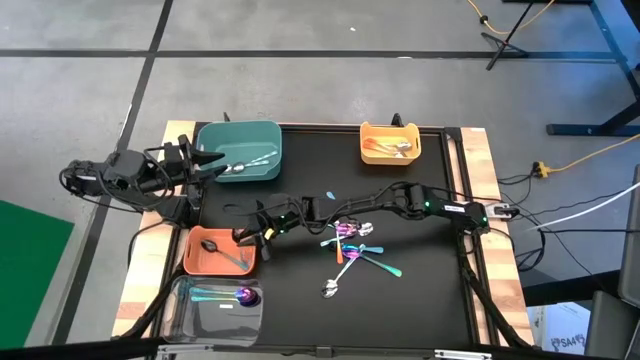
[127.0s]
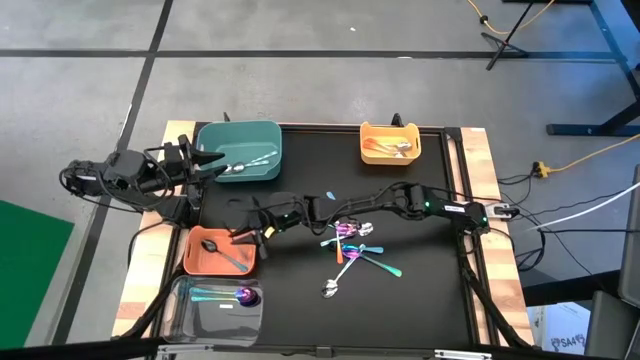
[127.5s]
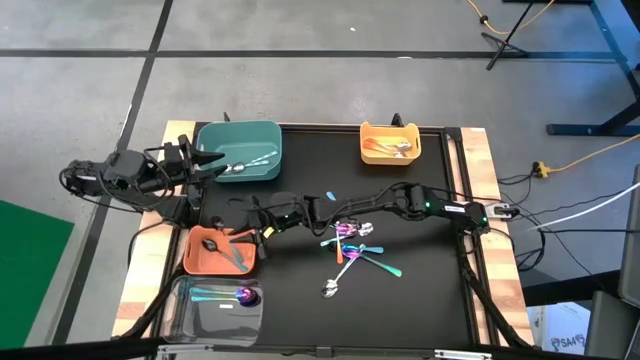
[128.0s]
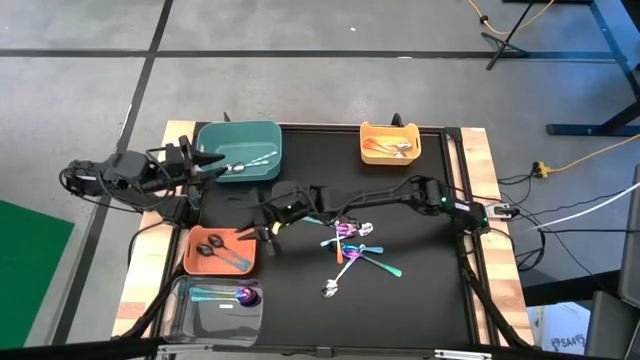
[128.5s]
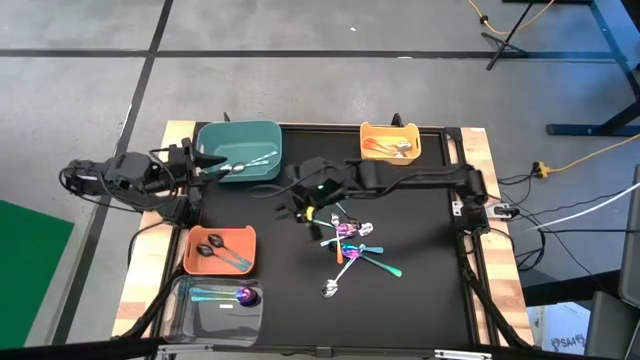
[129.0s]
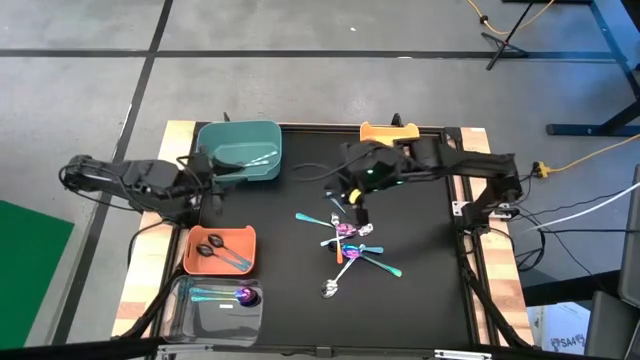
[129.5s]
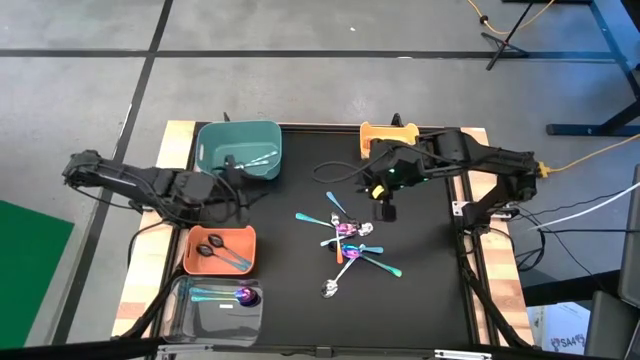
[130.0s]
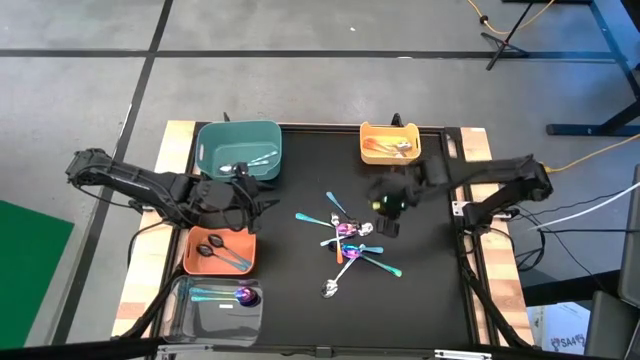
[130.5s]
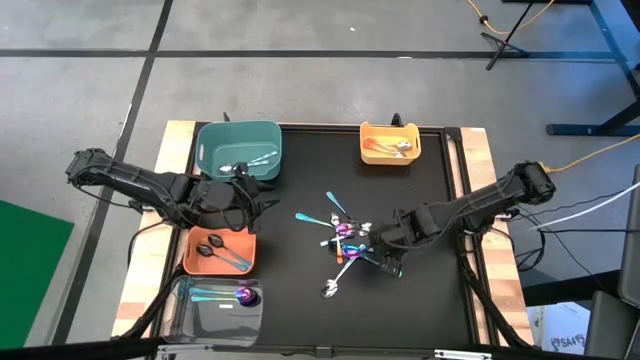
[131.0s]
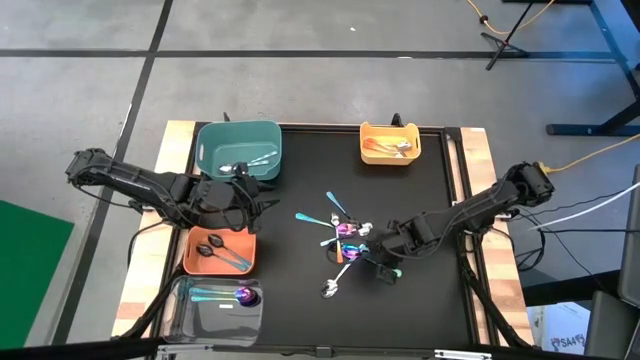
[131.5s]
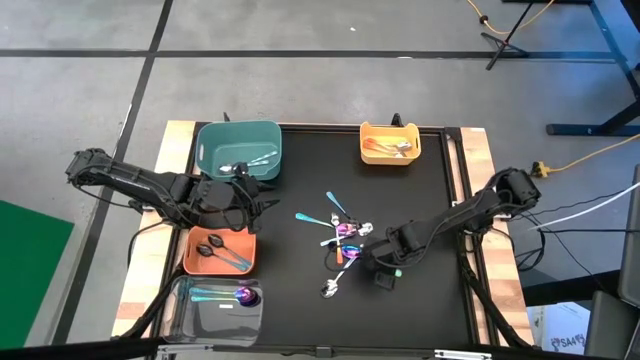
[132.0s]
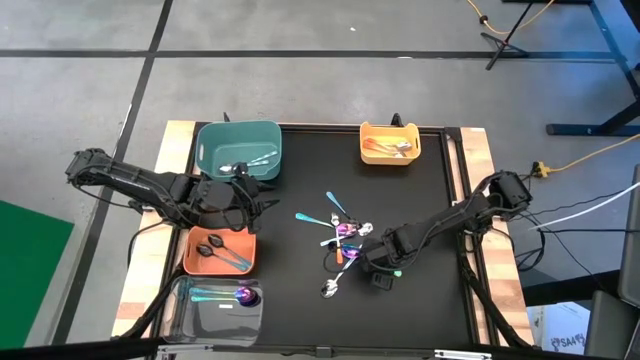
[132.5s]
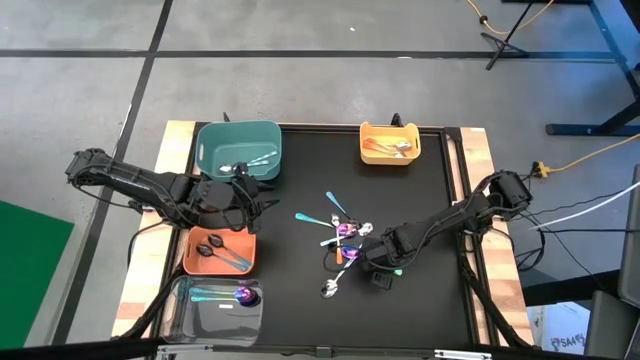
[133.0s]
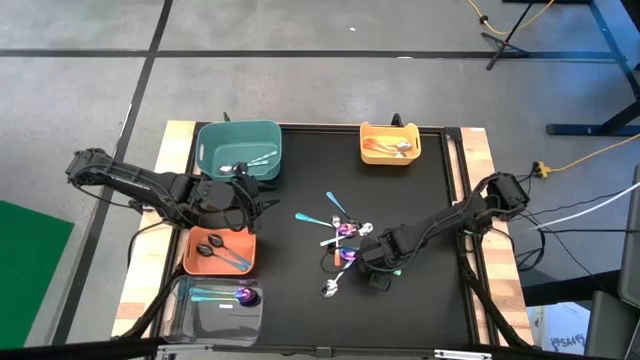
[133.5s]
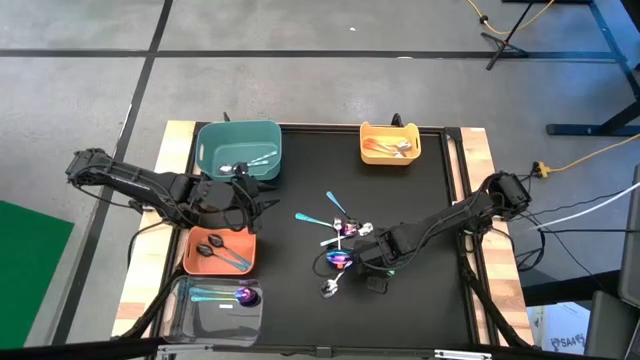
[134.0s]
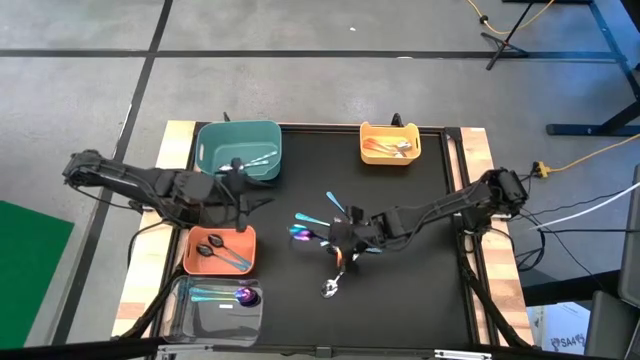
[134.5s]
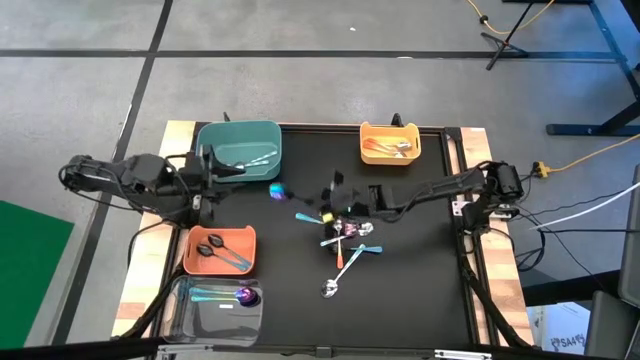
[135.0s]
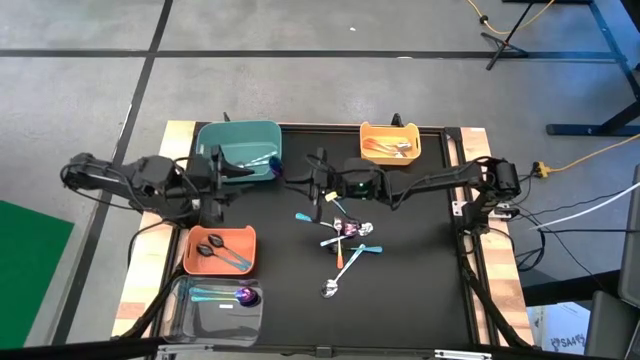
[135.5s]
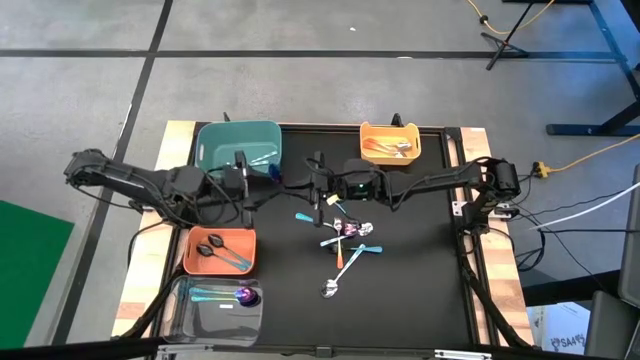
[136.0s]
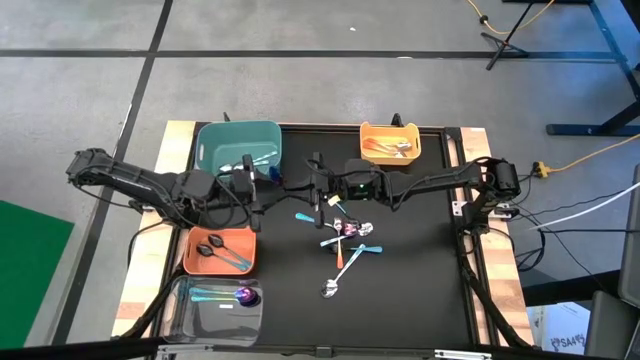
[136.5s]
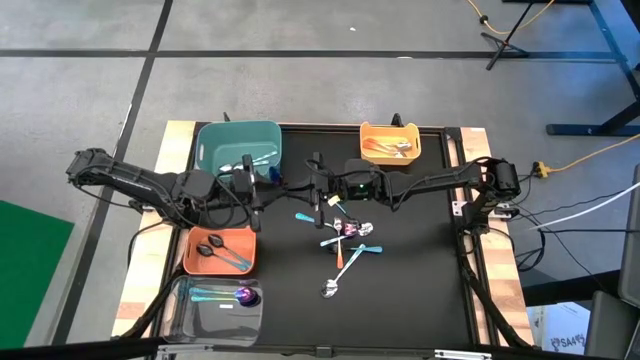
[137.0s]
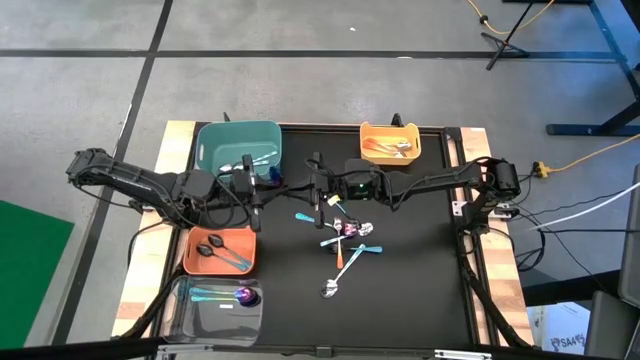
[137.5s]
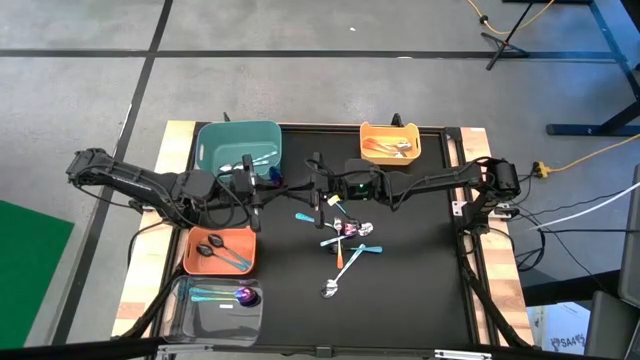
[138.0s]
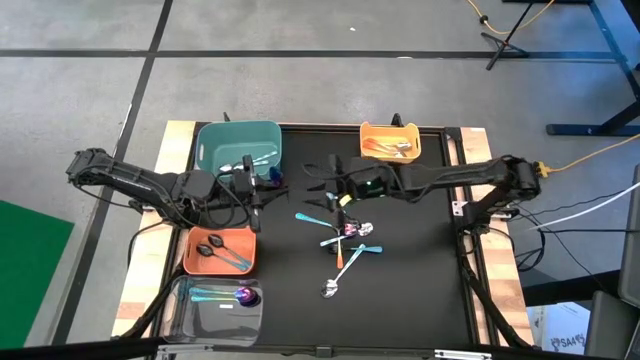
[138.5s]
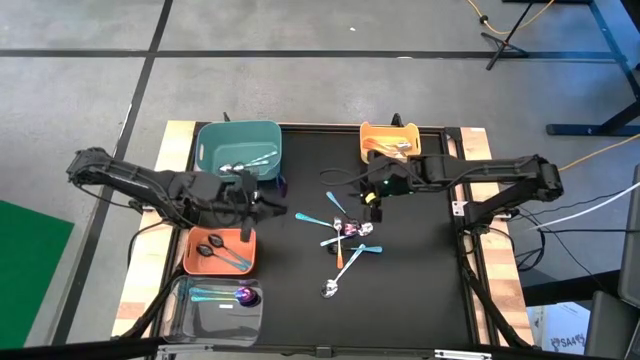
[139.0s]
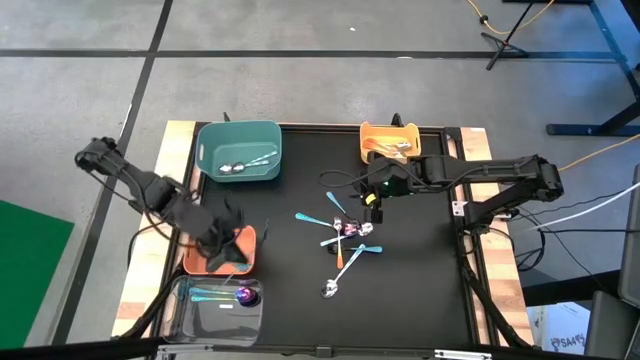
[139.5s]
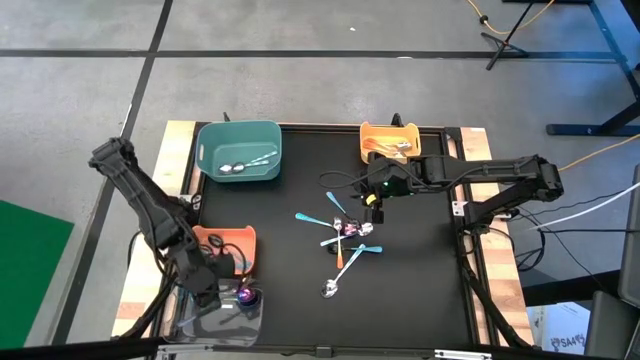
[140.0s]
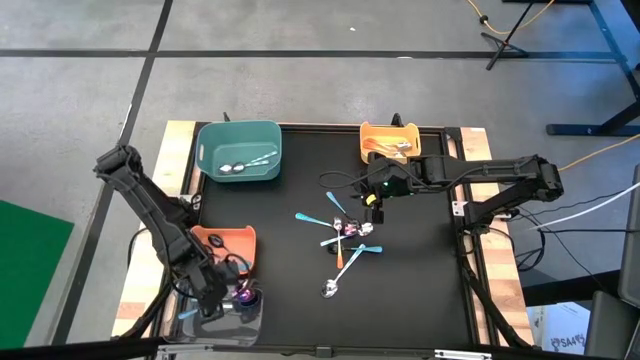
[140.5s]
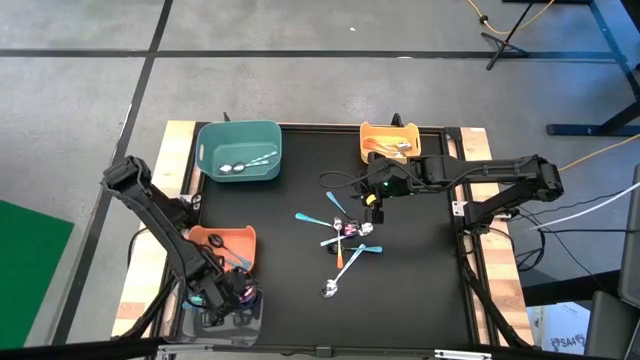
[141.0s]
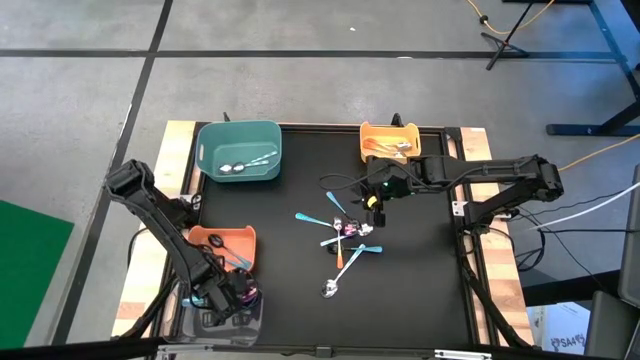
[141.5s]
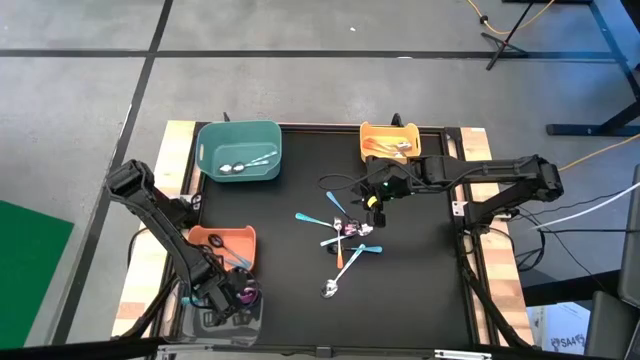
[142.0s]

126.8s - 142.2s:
Task: Sort silverware by color (type)
Put the violet spoon into the transparent bin

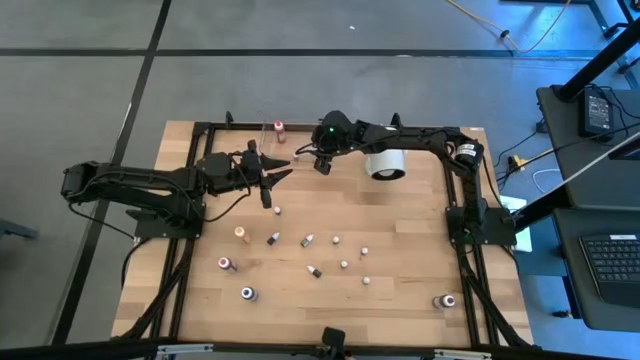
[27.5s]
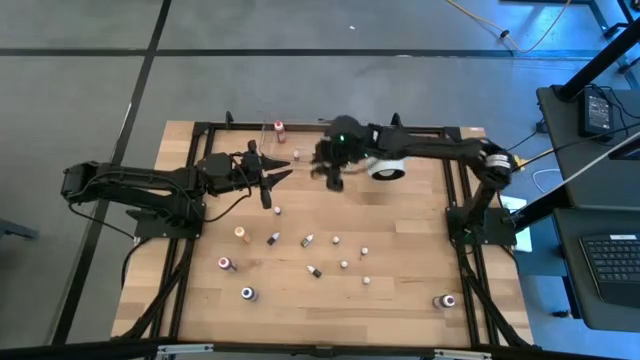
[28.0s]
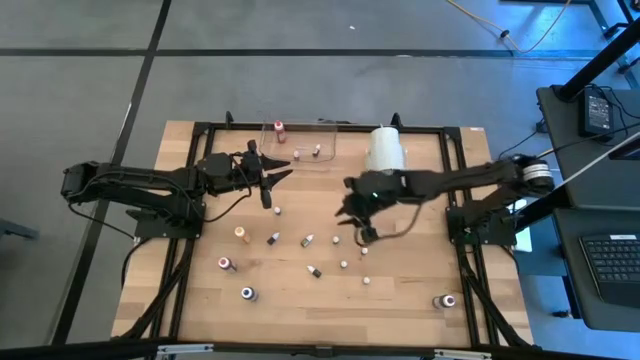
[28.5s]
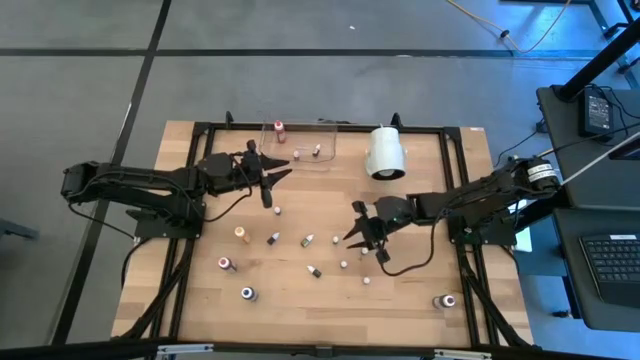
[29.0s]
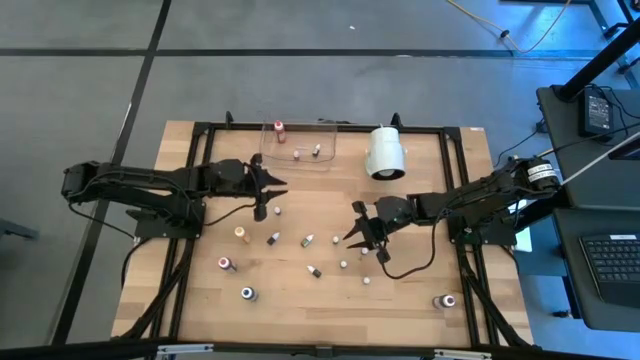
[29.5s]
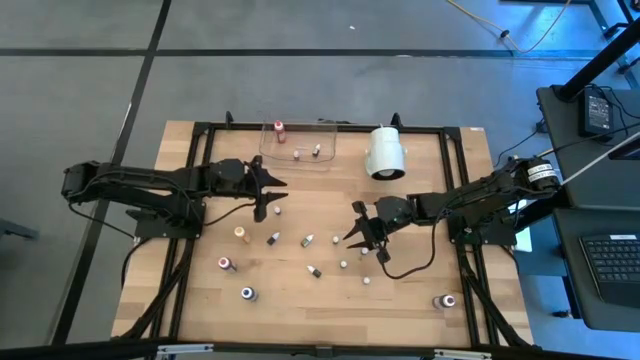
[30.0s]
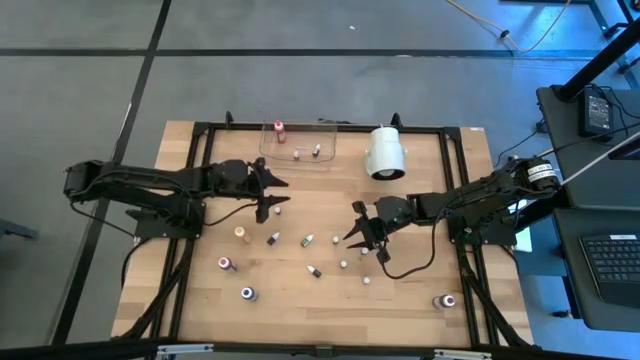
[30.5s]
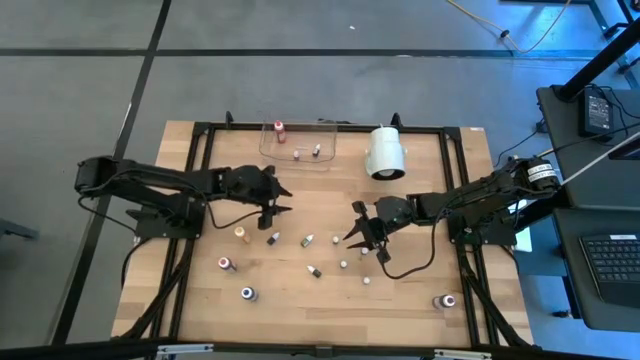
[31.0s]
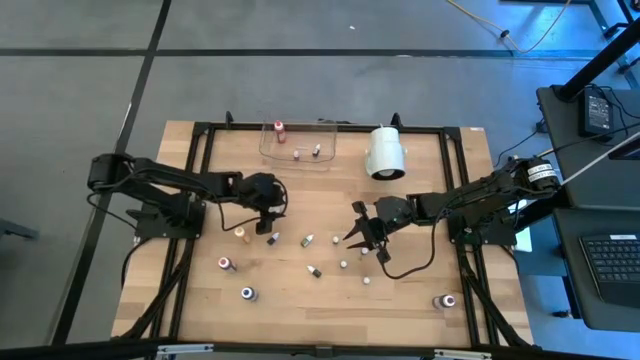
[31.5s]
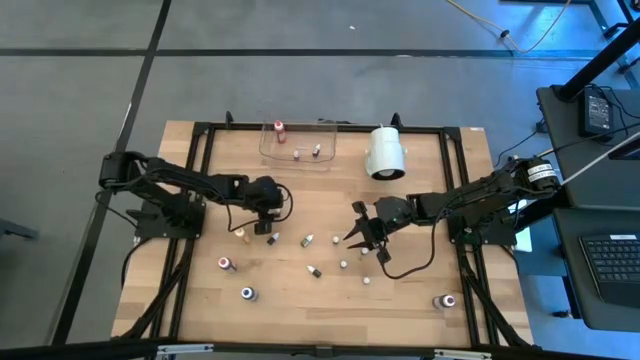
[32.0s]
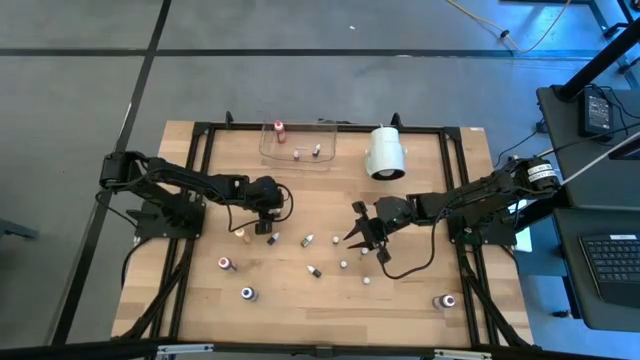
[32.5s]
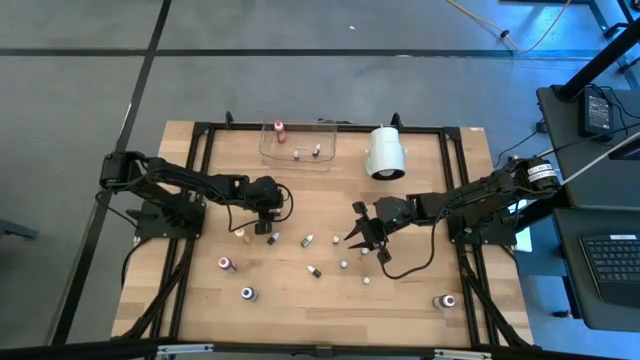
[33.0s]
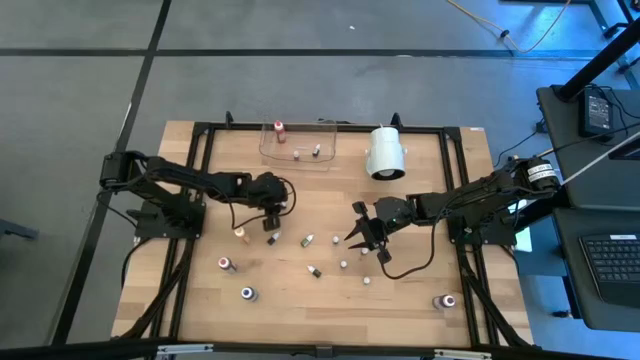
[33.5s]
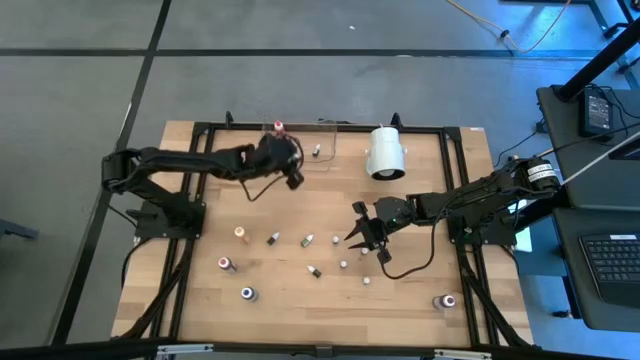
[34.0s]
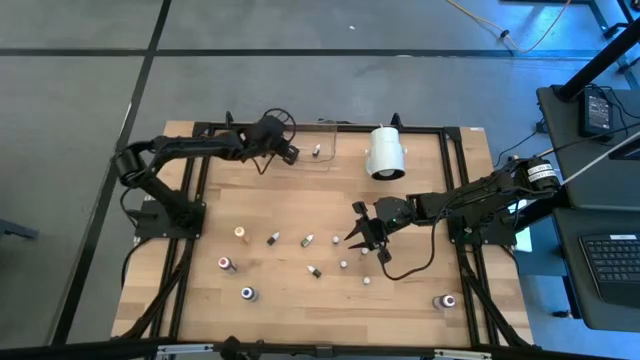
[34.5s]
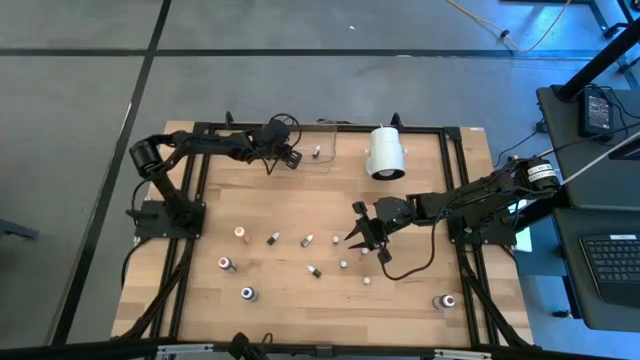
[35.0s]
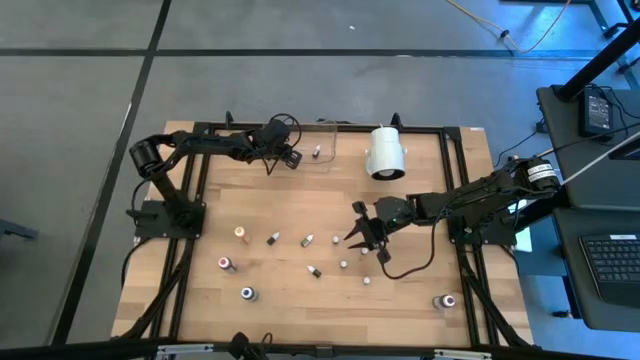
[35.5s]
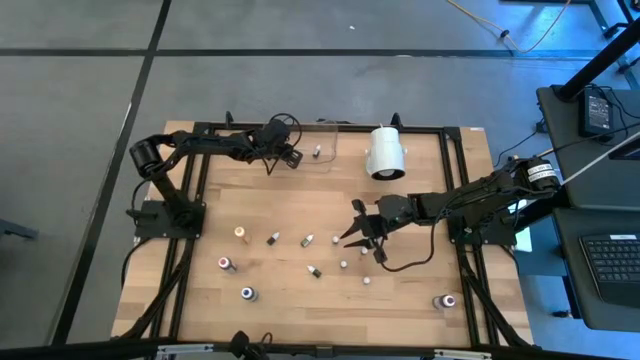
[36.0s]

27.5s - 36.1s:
Task: Pick & Place food coloring
Put the black food coloring bottle into the transparent bin
